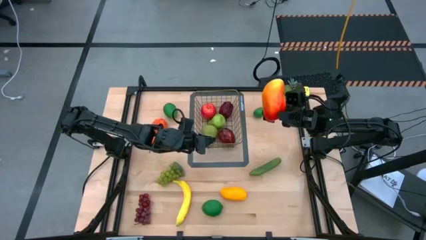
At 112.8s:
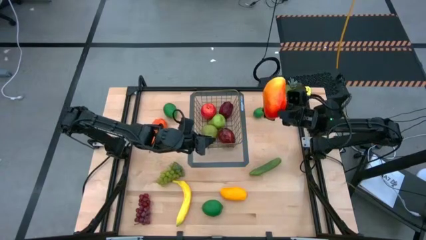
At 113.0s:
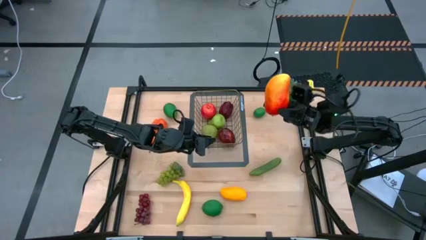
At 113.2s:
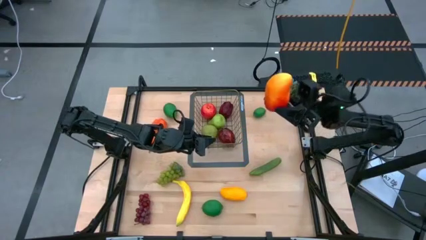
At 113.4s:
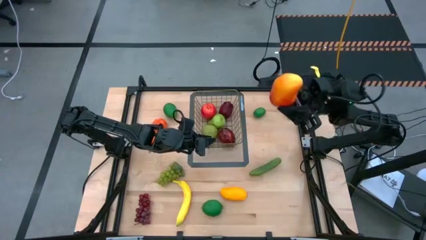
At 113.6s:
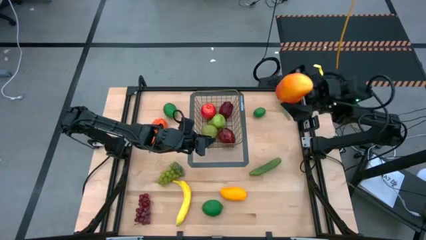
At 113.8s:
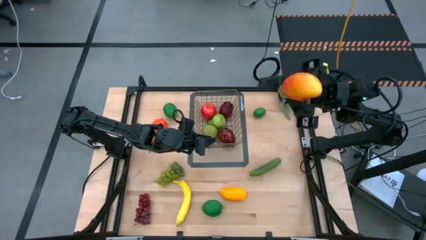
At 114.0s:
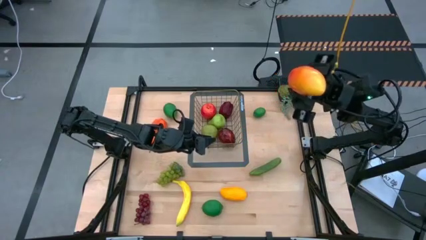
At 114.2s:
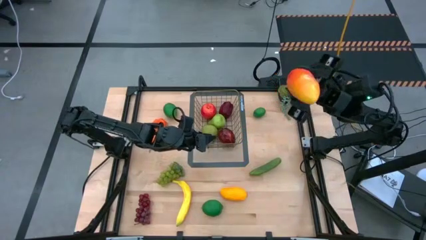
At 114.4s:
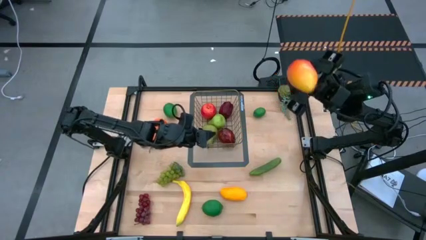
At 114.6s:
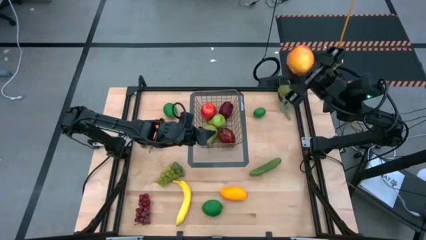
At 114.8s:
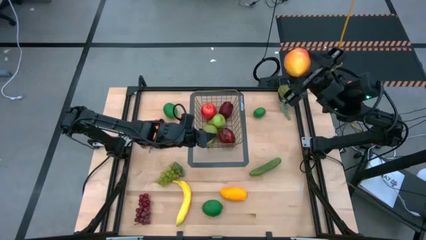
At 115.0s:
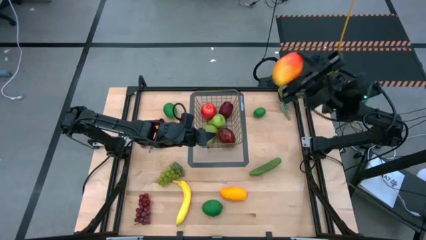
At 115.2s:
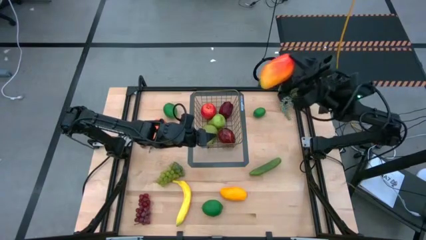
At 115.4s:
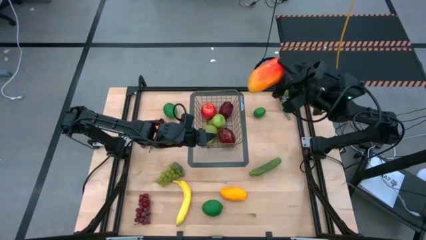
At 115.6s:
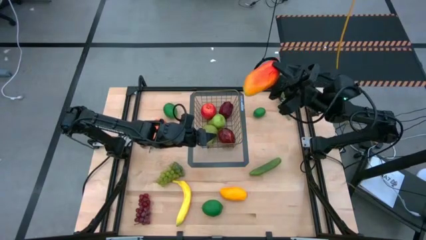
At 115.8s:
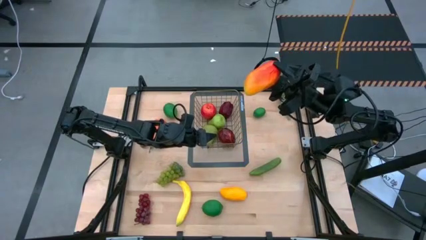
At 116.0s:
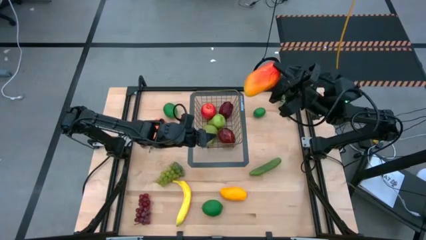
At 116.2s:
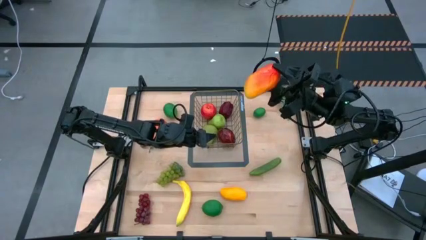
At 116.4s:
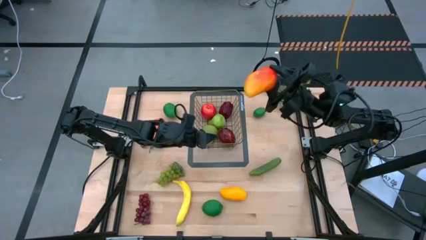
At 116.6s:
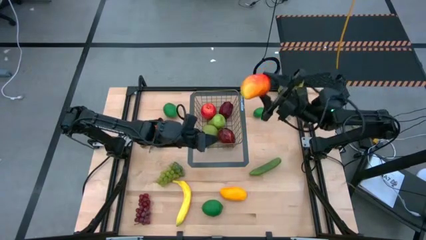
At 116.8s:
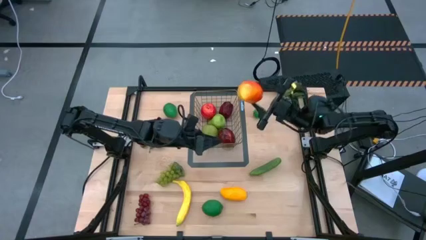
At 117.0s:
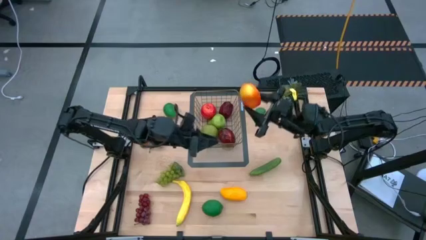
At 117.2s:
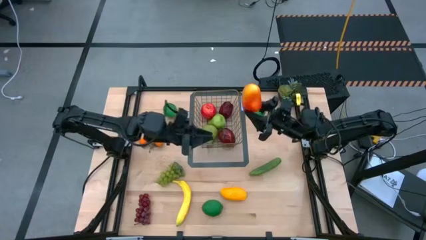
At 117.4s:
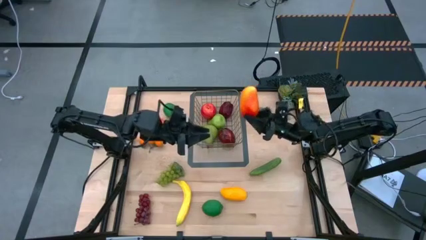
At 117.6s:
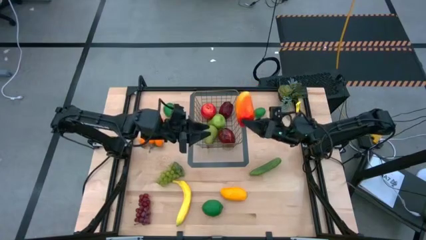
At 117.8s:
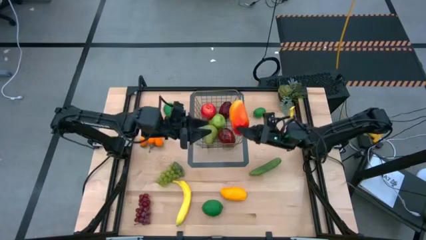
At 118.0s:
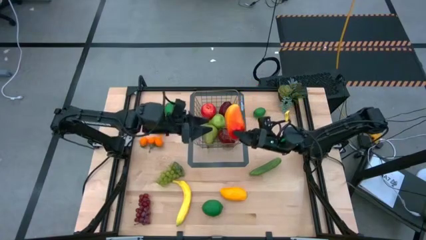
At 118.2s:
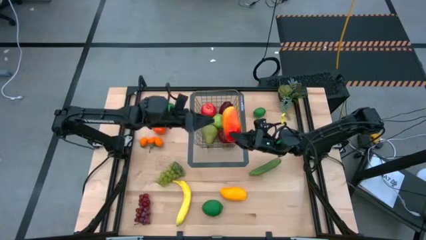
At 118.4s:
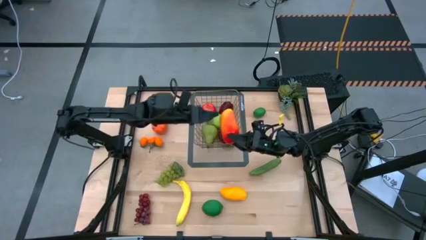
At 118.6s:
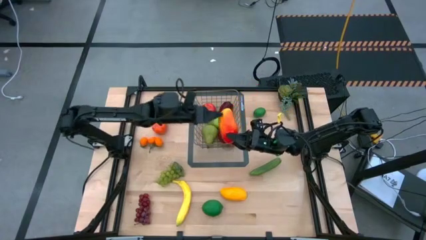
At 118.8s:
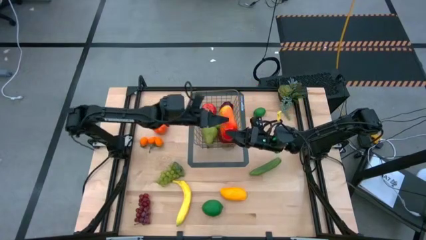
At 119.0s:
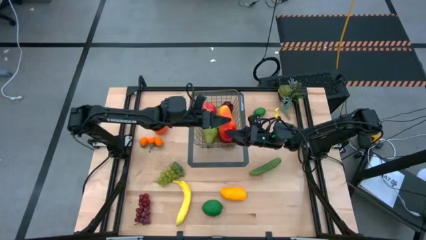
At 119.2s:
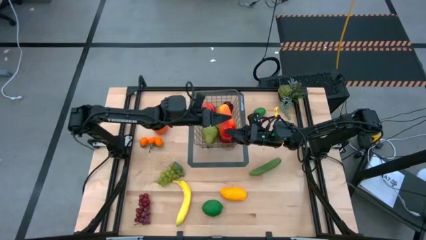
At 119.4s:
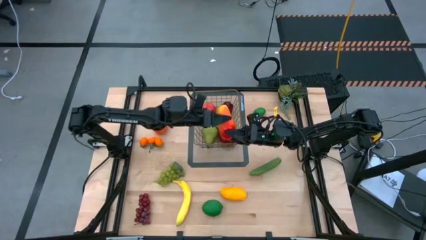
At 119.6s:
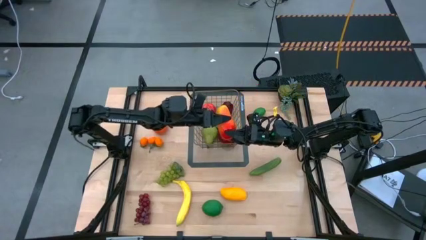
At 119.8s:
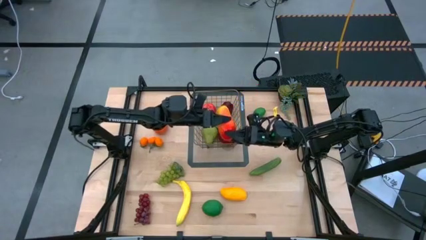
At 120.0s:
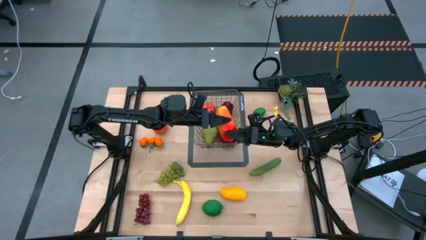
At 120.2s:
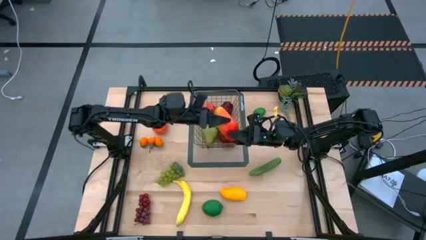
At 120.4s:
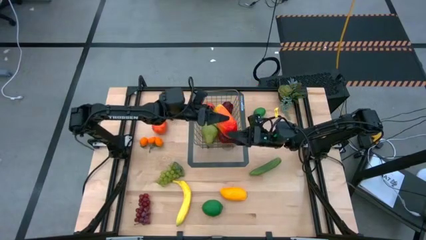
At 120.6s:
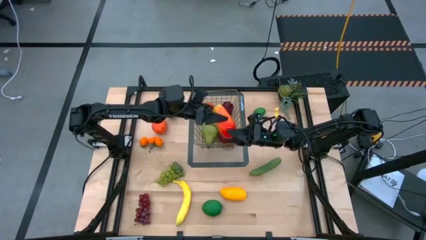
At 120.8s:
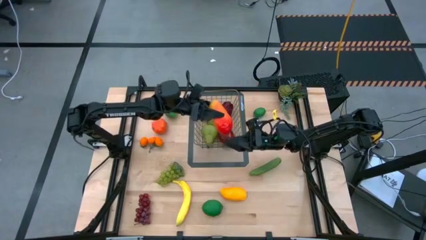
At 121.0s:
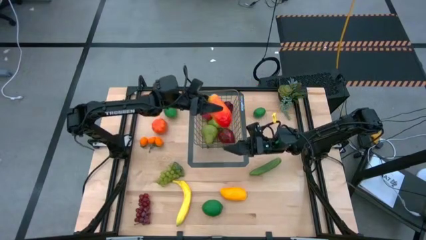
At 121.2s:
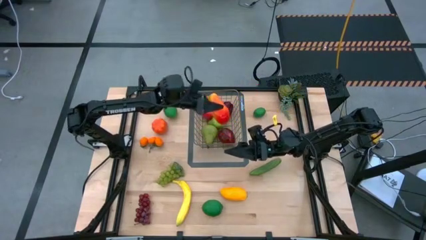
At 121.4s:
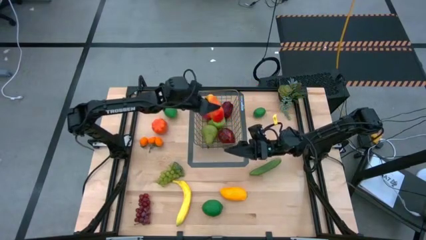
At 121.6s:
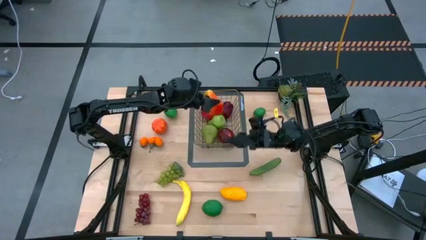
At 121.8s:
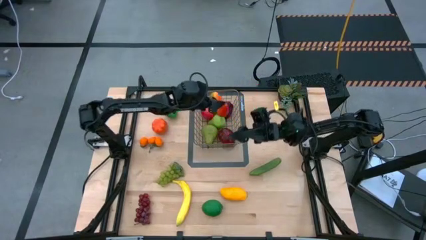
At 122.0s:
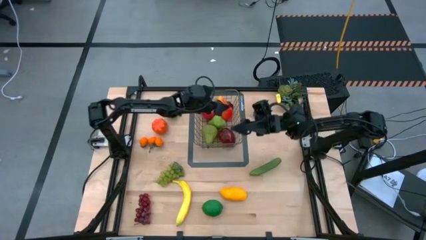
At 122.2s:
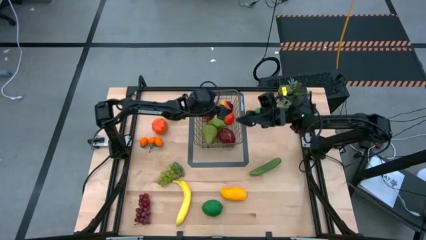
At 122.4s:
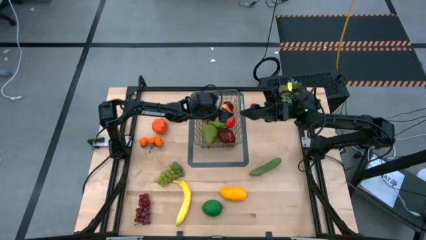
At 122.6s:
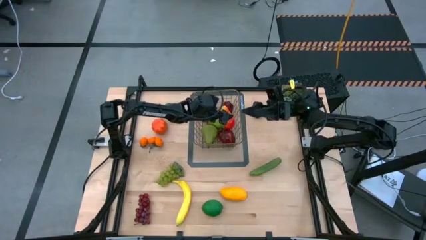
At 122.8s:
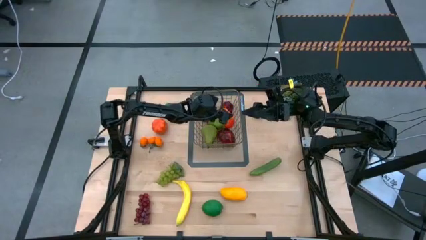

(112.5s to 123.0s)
Task: Build produce basket
Put the orange mango into the gold wire basket

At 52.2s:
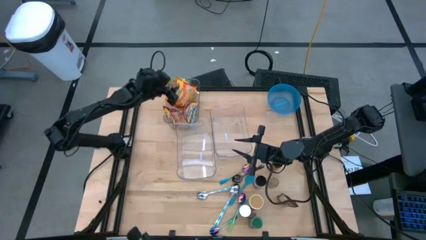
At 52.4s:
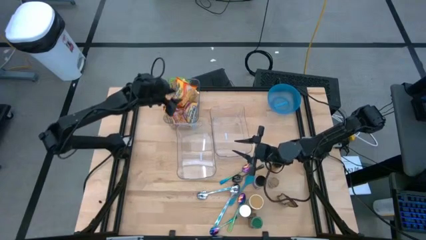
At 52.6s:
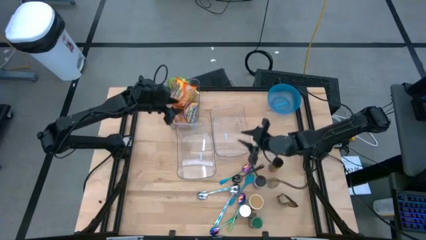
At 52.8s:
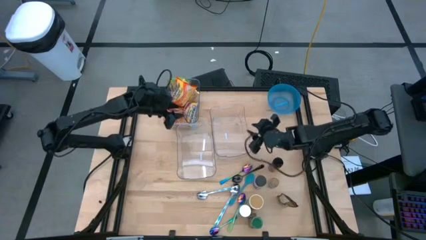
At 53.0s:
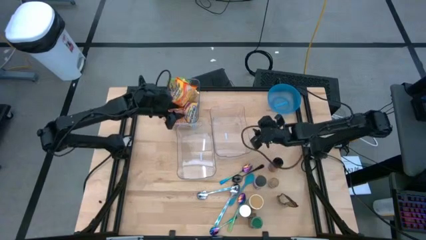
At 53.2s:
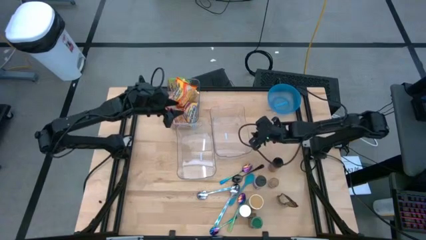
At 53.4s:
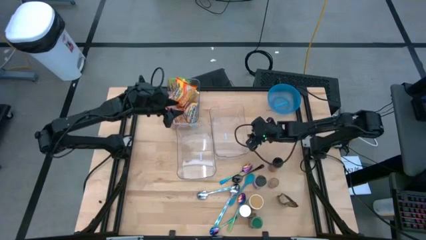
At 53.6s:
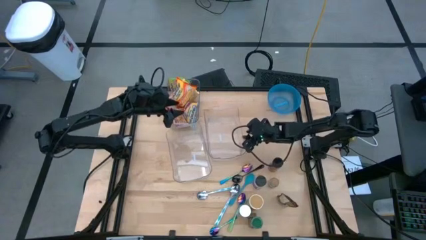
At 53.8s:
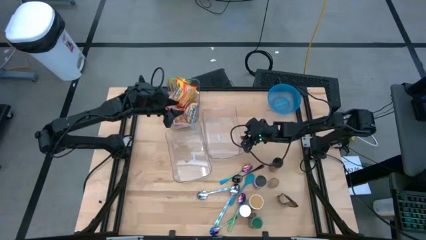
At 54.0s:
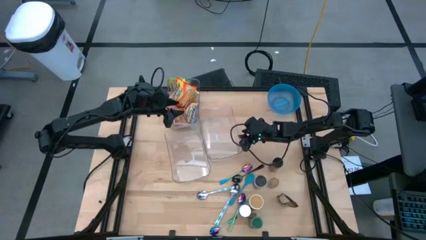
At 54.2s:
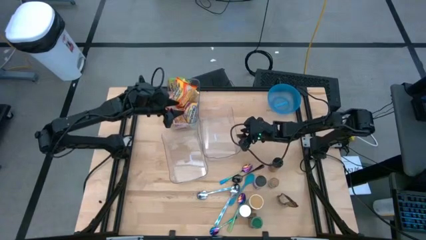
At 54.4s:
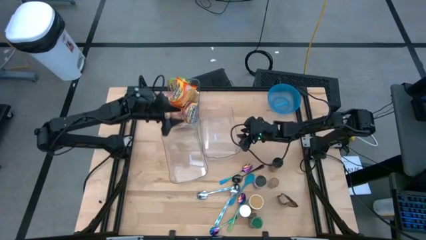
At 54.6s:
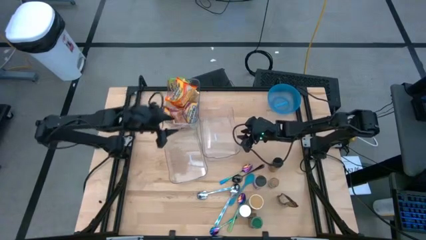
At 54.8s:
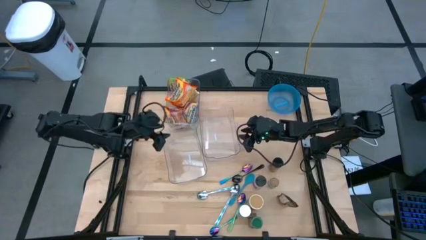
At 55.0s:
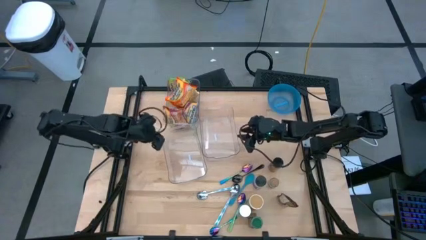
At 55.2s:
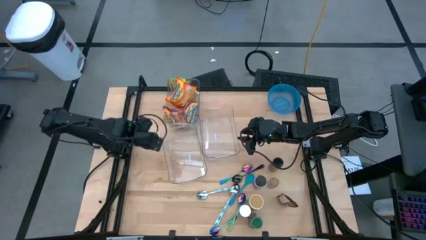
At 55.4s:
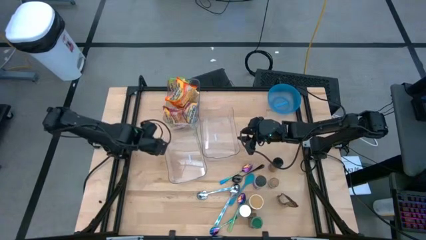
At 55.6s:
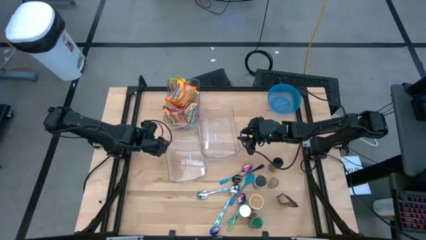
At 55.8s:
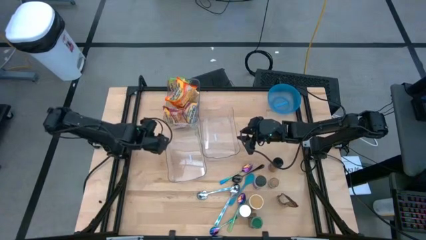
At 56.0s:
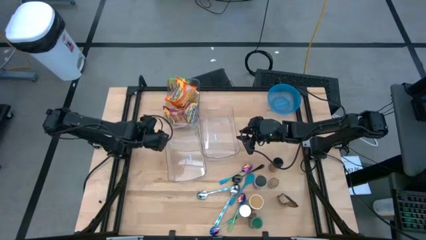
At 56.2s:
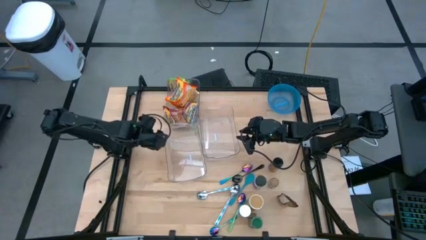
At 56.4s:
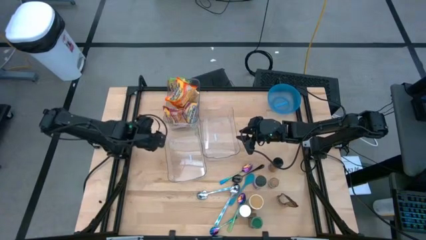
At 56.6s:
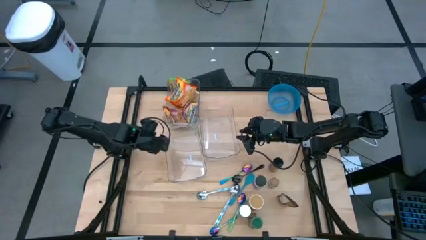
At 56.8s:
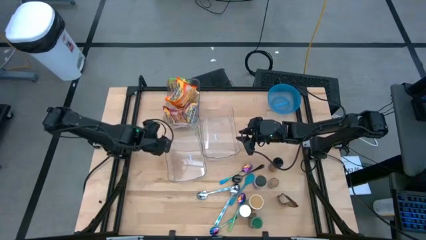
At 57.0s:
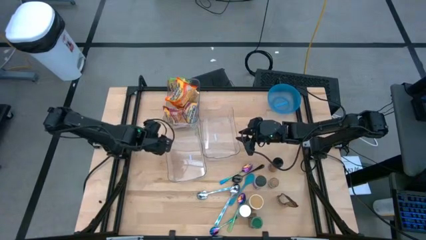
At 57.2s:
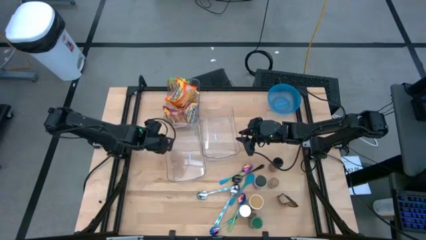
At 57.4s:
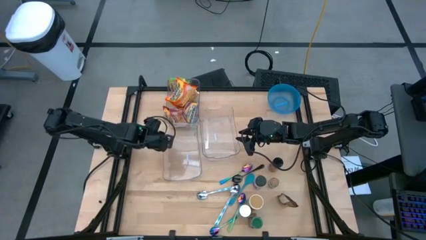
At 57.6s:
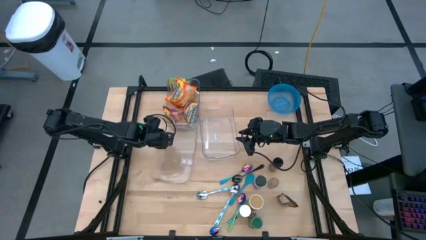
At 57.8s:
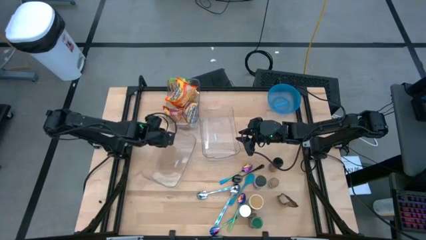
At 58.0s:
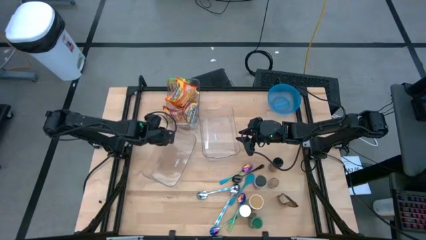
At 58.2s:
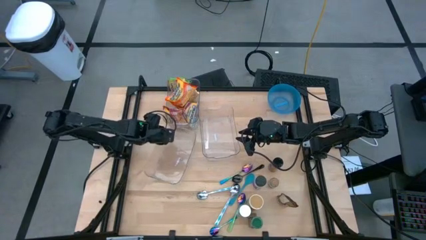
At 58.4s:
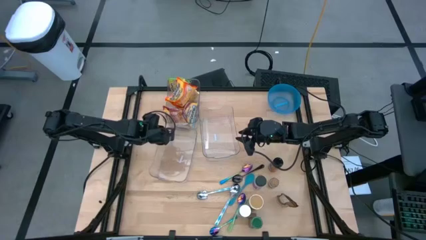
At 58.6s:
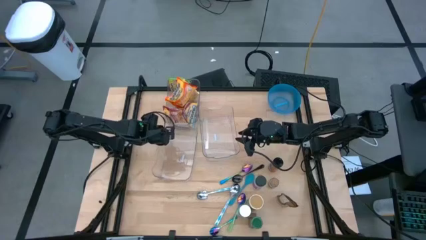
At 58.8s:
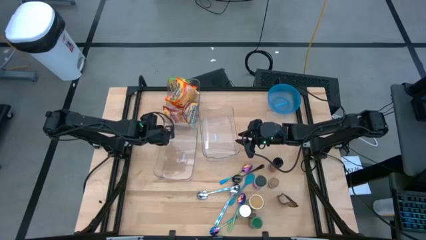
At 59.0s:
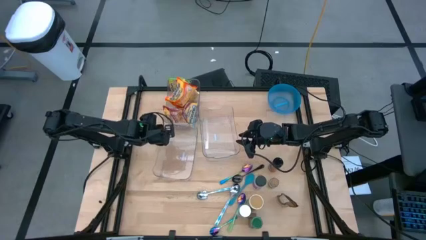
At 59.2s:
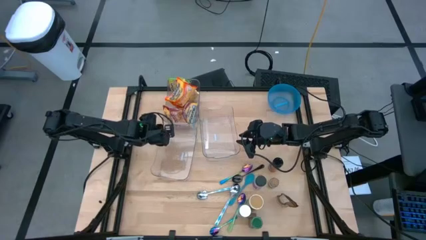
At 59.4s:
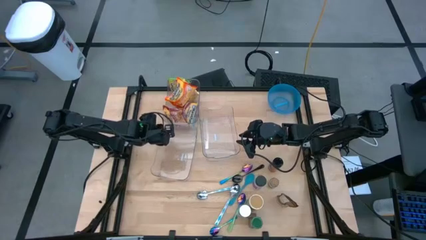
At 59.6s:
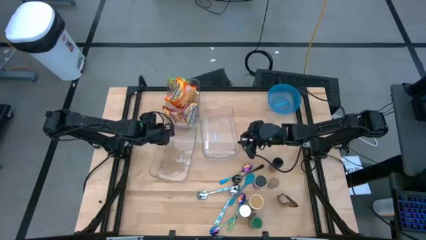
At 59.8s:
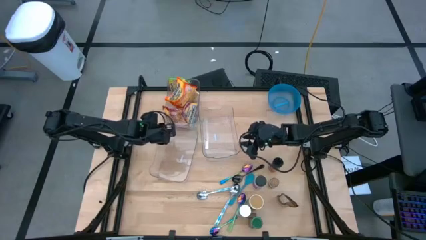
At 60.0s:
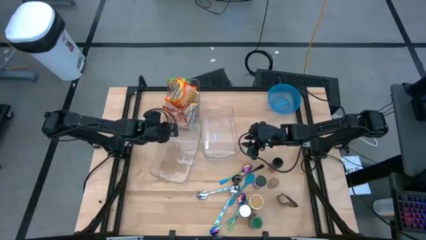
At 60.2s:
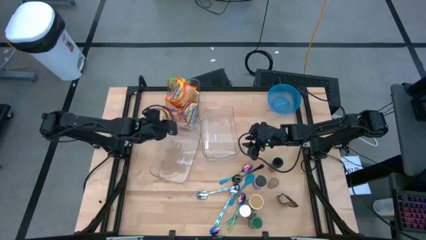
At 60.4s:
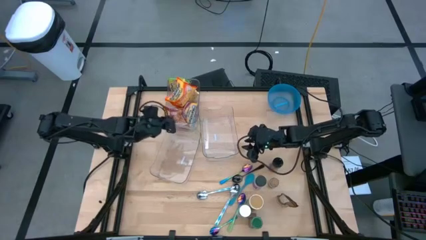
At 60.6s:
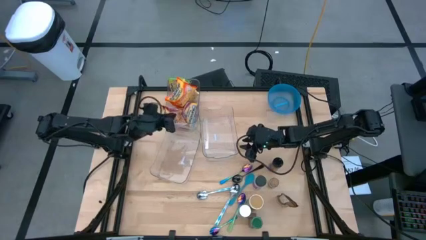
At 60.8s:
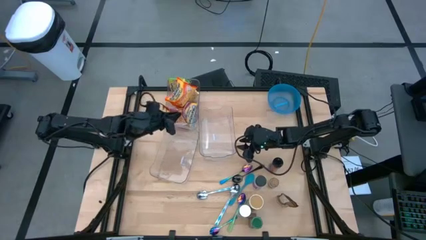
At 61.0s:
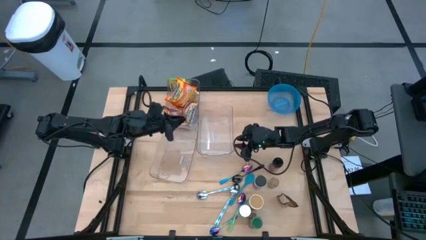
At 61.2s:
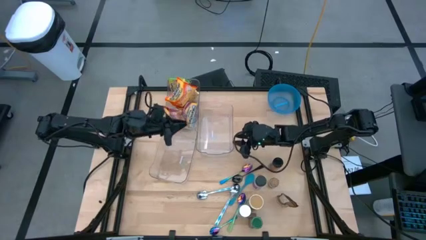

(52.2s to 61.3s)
Task: Pick & Place Food Item
Adjust the transparent bins
